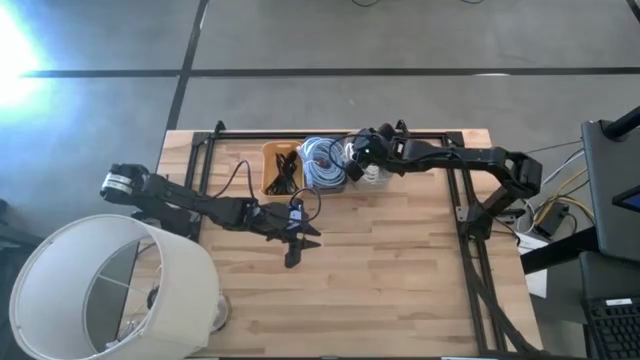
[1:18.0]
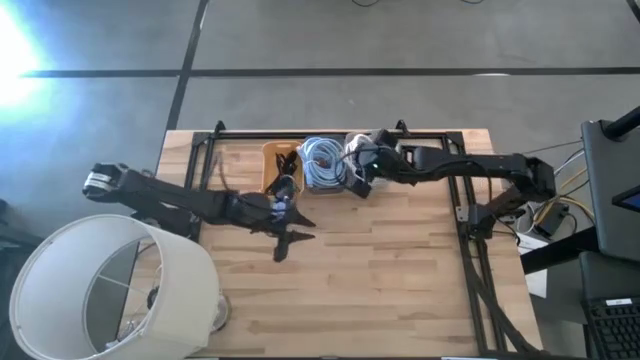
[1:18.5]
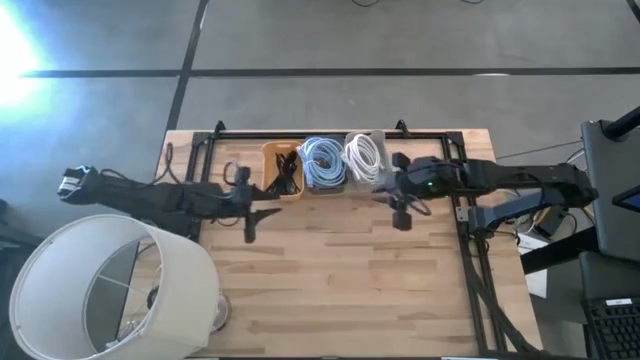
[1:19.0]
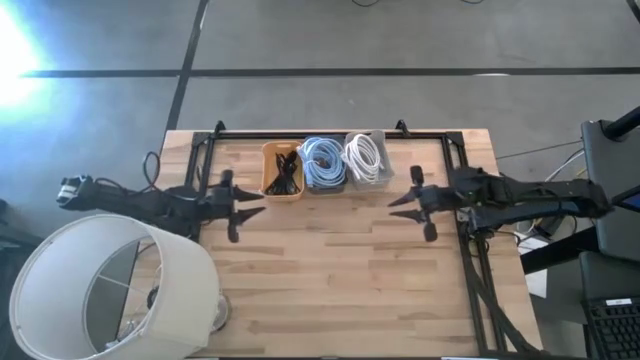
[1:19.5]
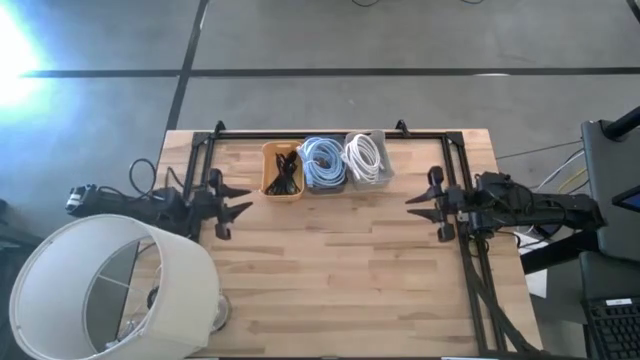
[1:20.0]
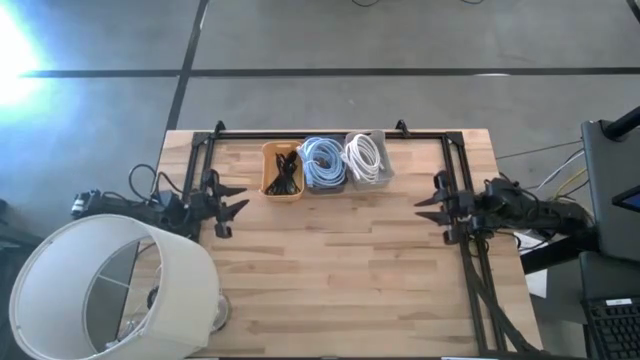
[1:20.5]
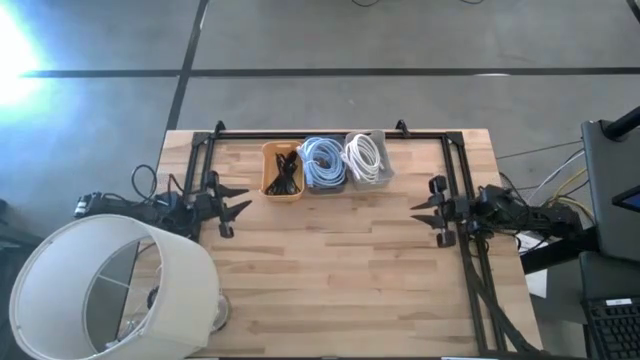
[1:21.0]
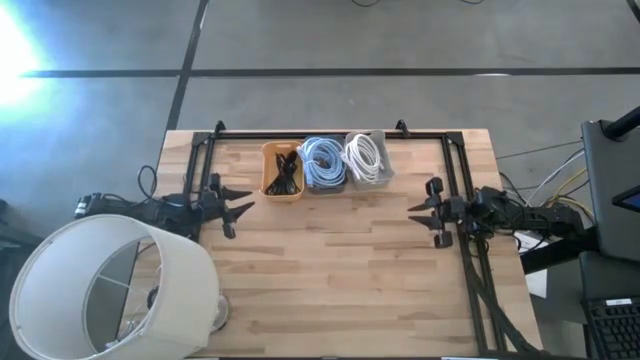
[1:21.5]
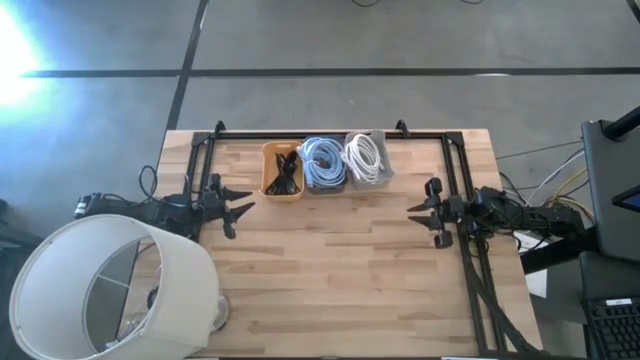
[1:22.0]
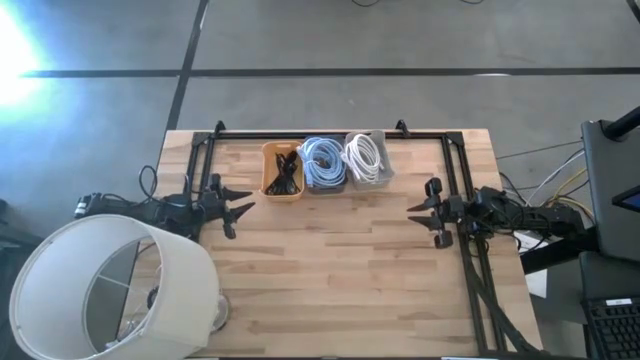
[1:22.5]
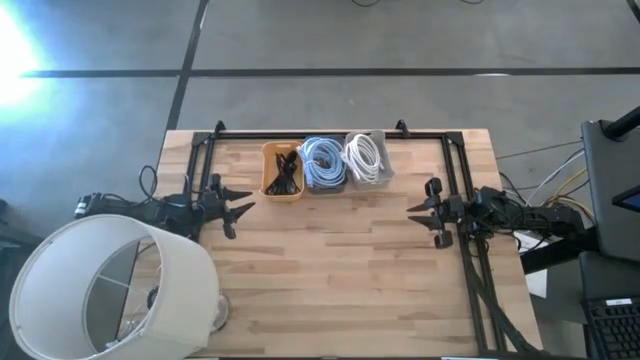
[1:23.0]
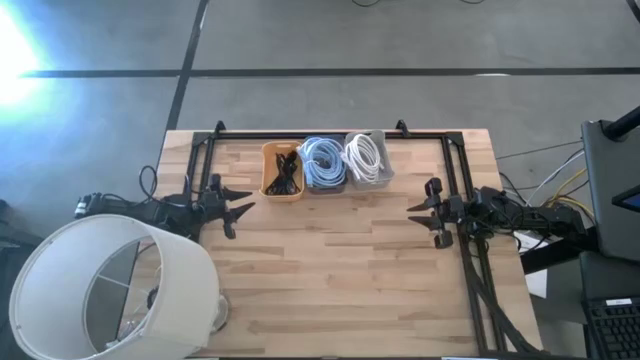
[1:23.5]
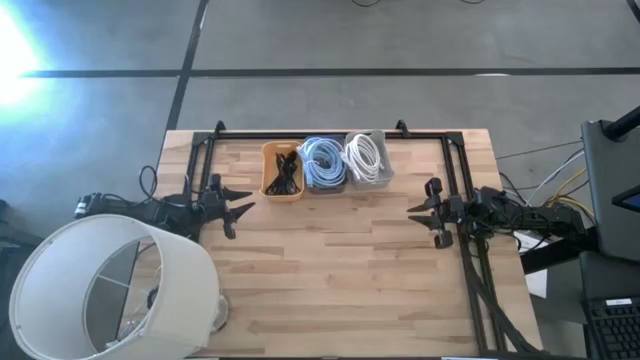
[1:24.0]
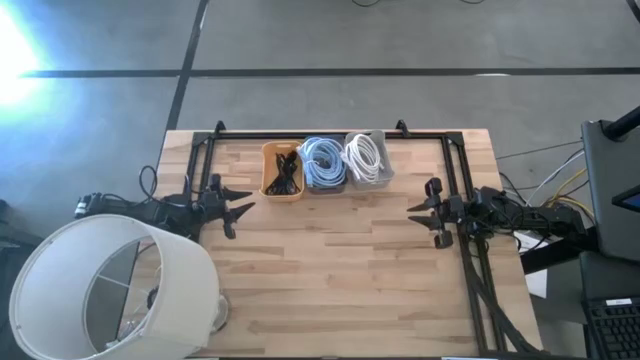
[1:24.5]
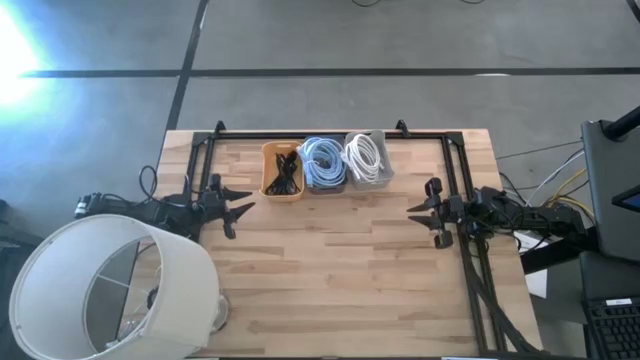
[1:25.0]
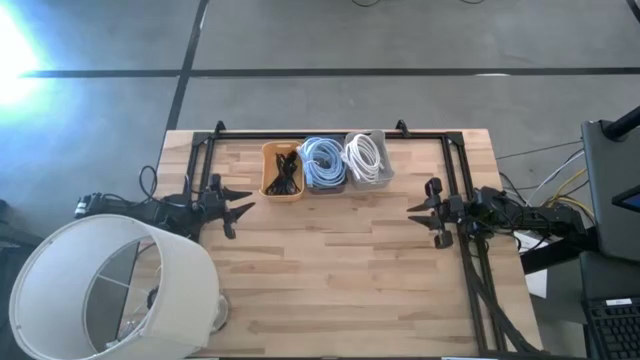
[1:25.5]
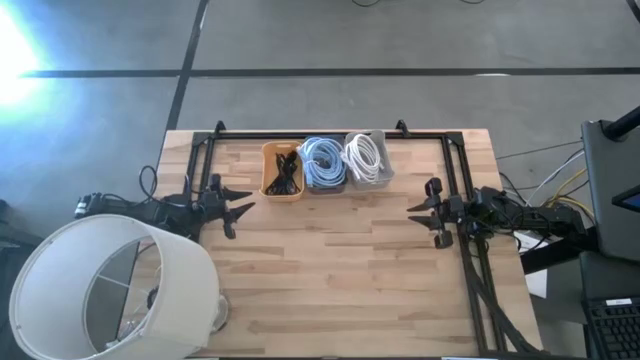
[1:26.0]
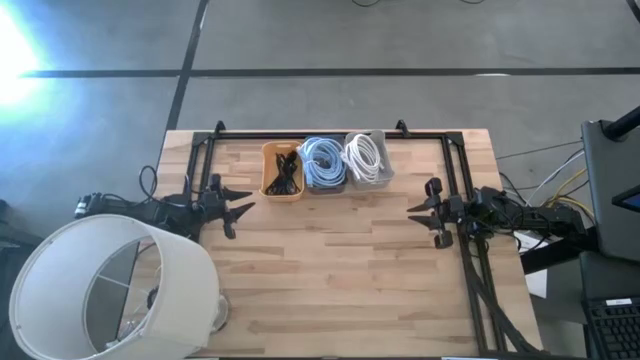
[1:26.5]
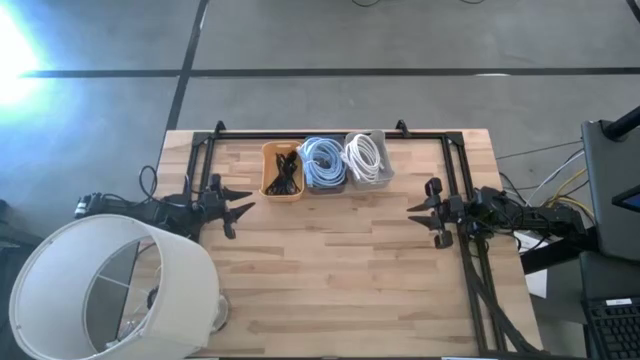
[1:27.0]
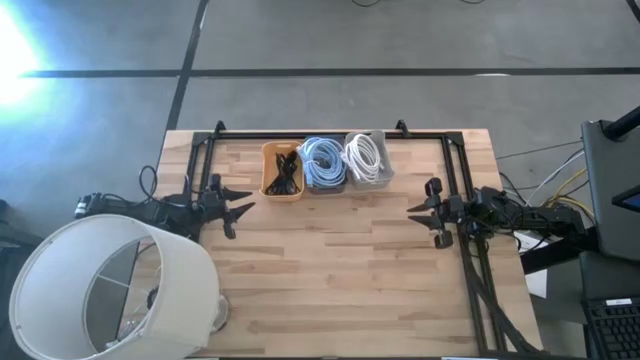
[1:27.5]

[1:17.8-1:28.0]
Task: Pick & Place USB Port
Return to Home Position

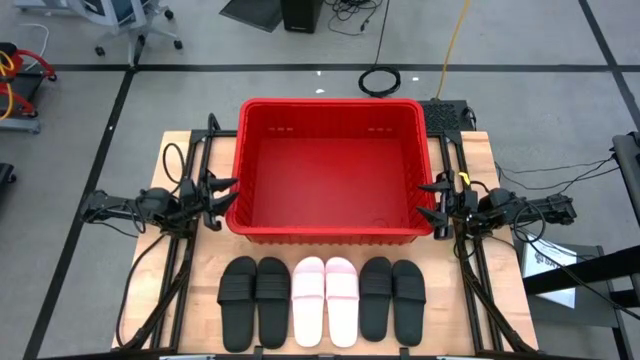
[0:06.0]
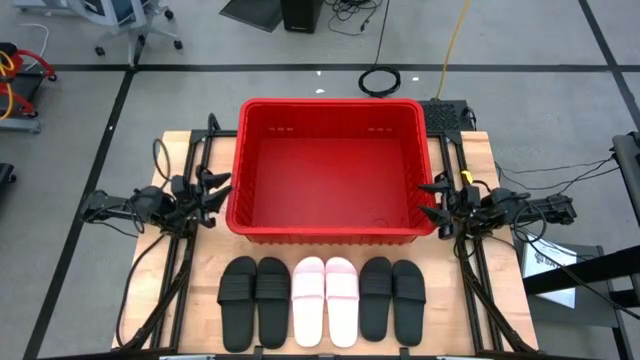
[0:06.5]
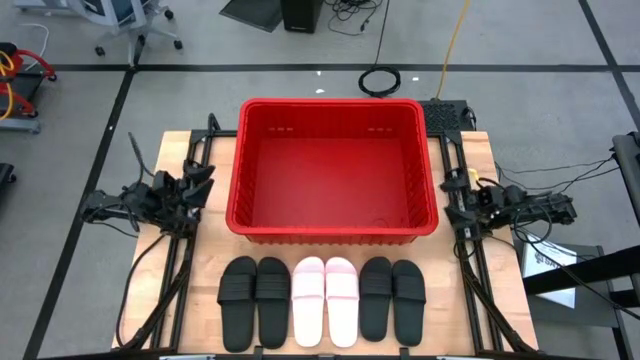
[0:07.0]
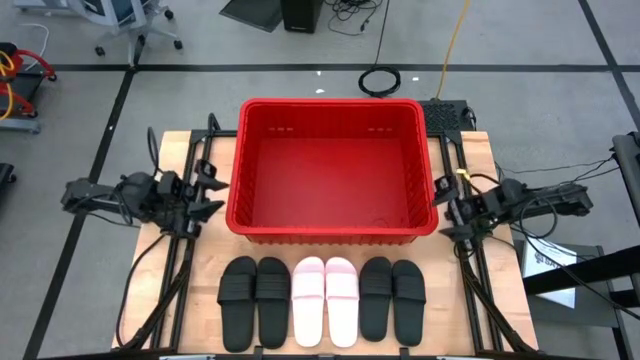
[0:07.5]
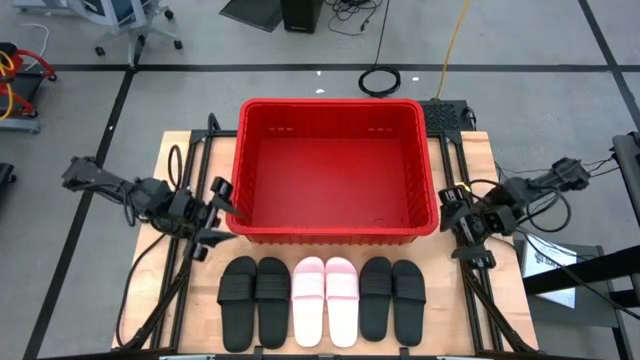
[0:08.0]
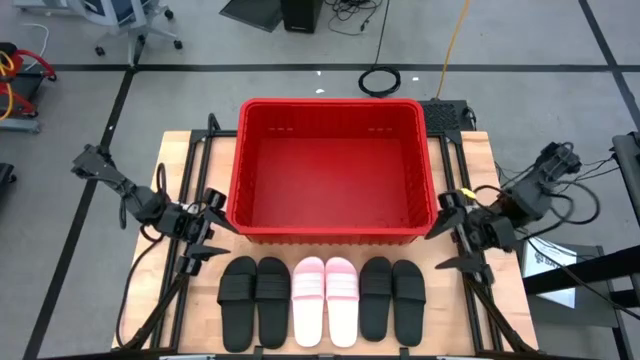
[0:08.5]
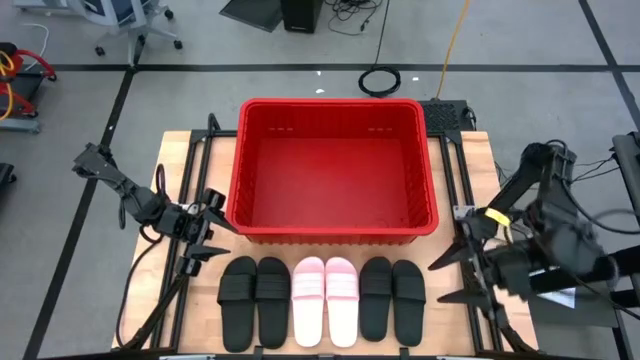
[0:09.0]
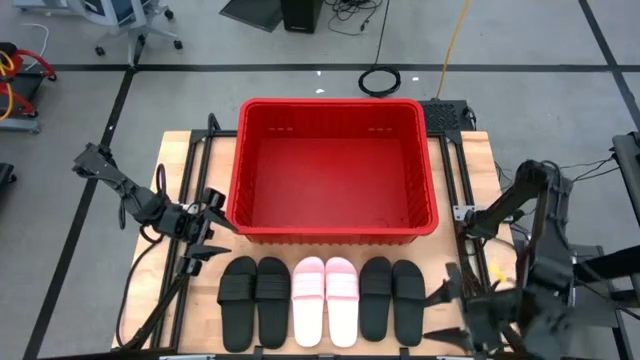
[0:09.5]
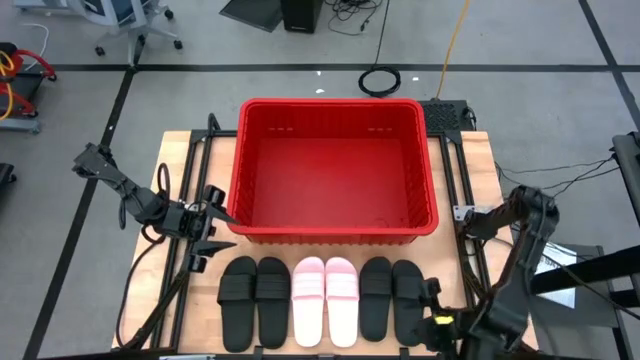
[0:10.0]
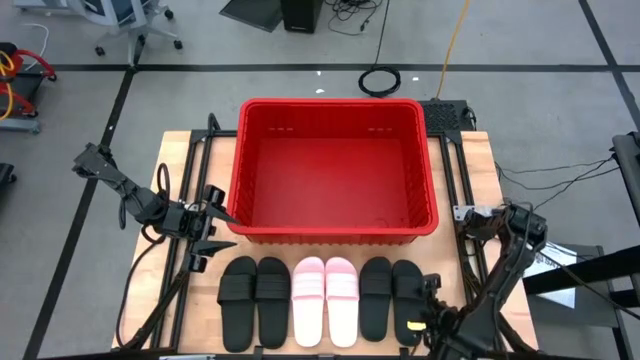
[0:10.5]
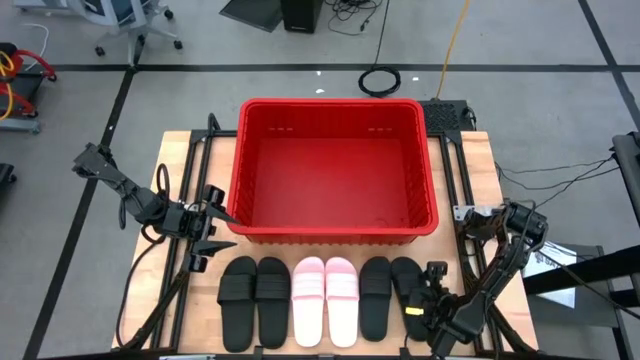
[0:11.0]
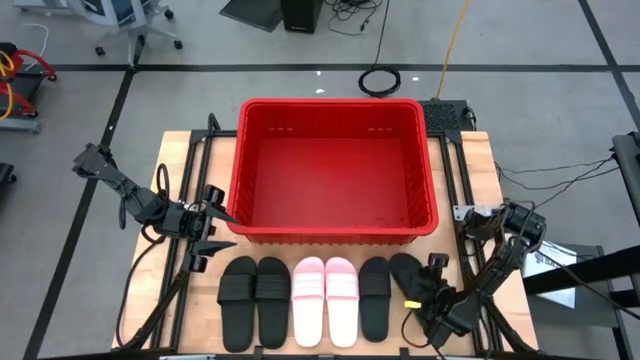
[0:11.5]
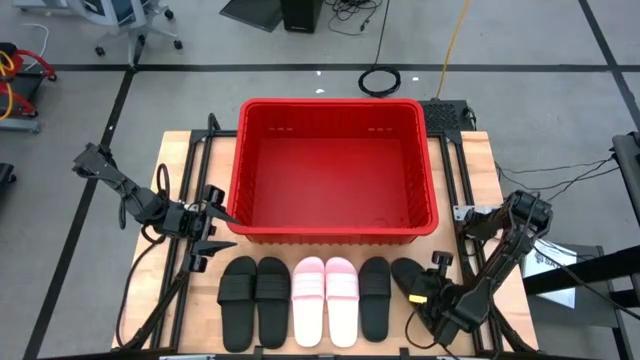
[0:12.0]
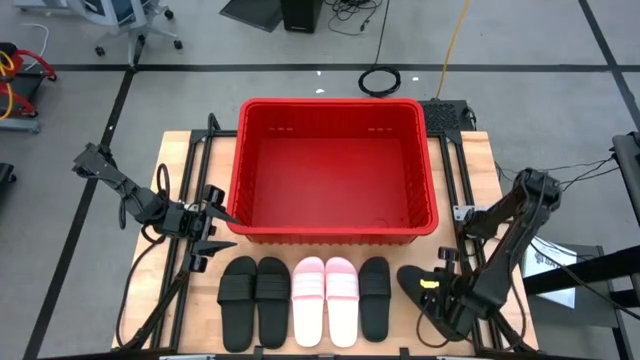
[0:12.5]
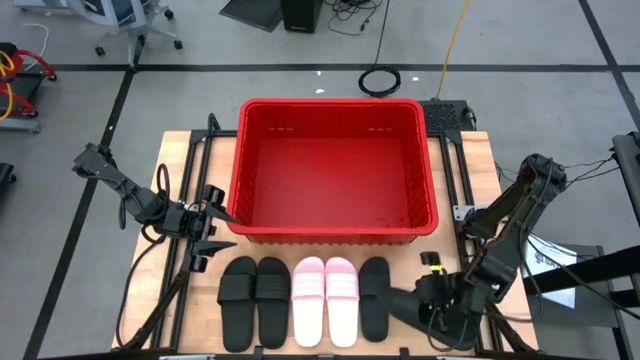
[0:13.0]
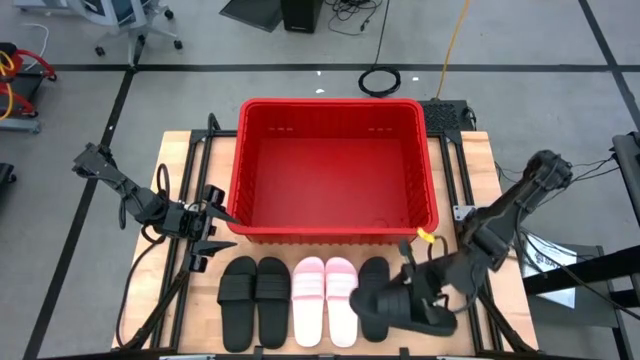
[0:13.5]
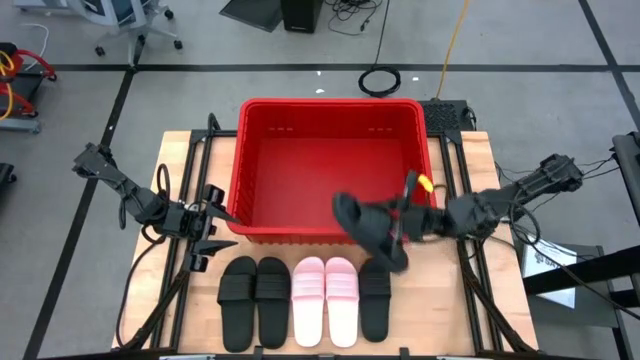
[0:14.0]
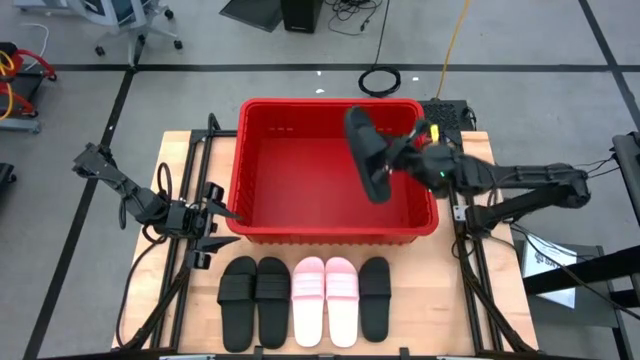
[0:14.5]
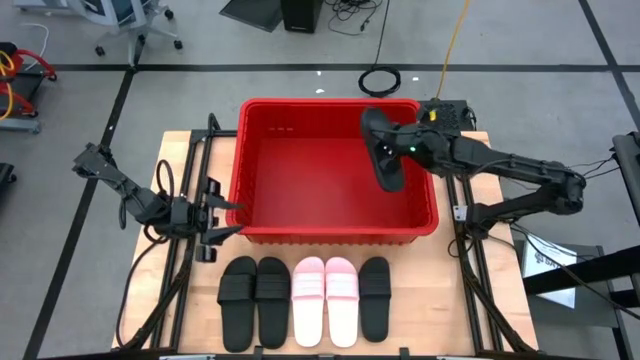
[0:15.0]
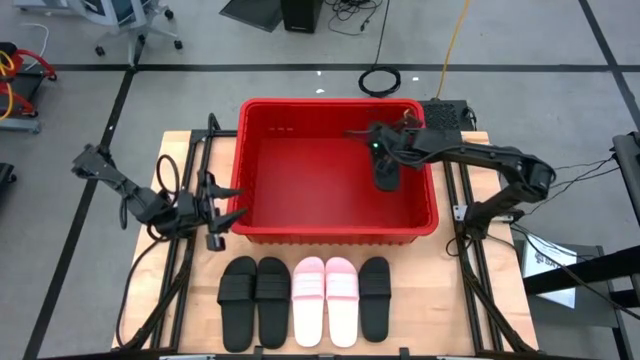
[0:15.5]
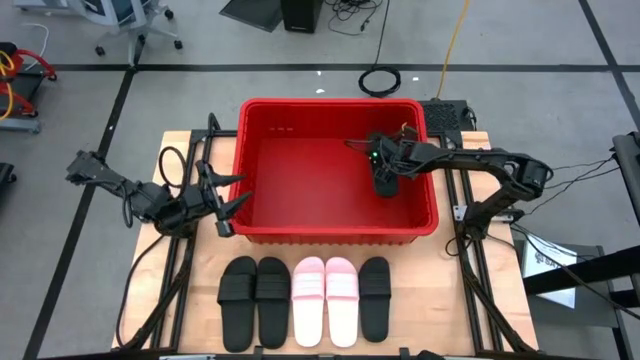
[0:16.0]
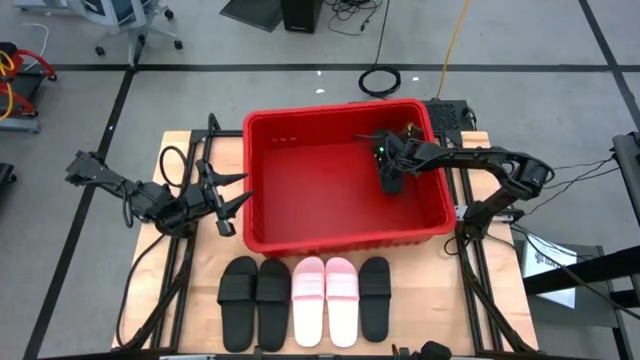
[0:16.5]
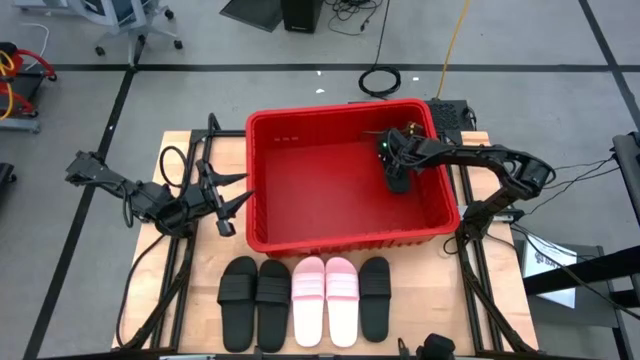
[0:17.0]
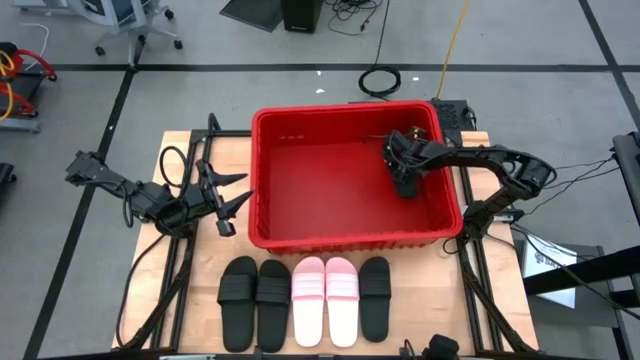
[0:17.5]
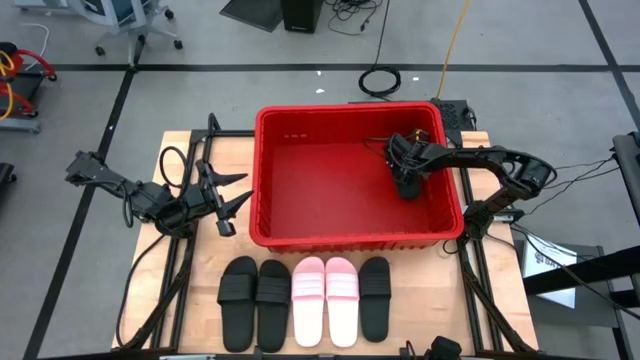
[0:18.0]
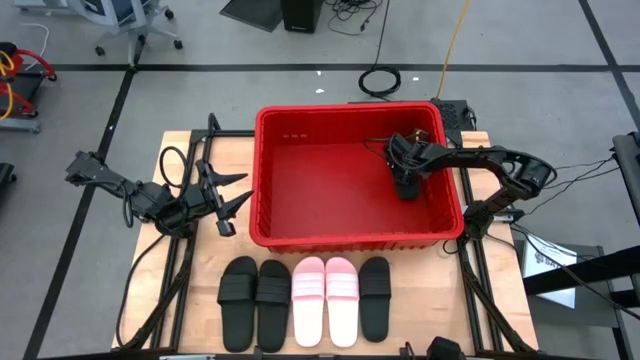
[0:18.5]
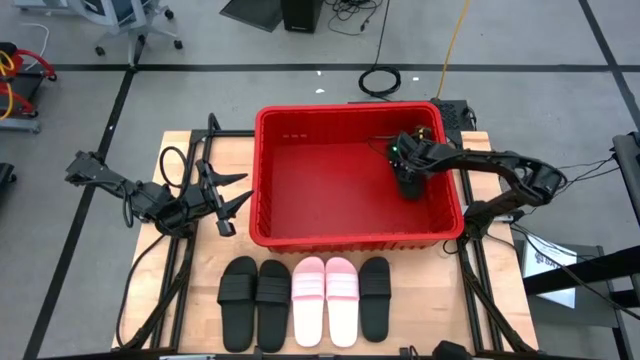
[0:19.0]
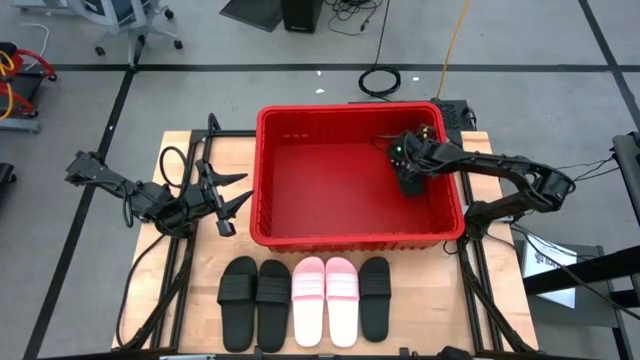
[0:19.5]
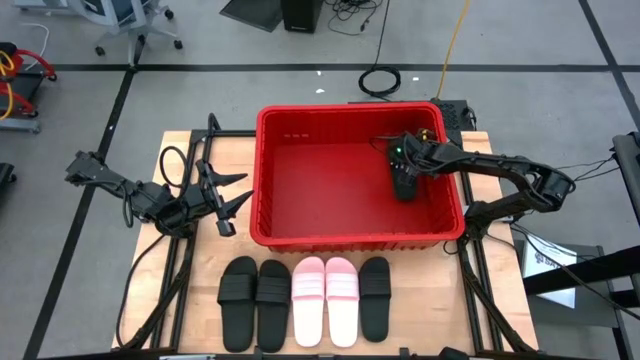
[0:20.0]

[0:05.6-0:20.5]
Task: Pick and place slides into bin
Put the black slide into the red bin
